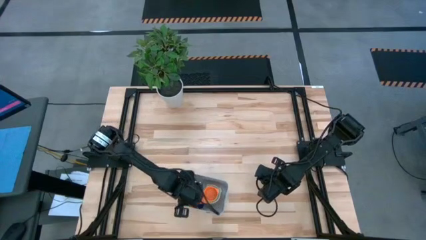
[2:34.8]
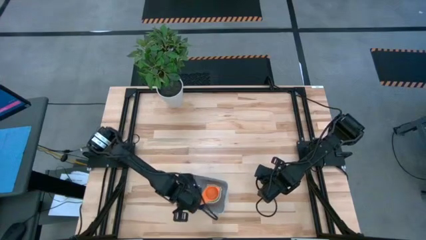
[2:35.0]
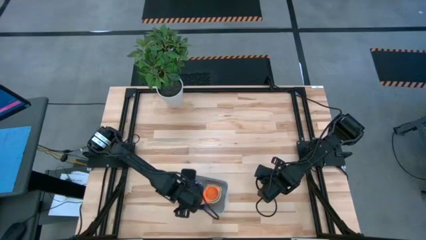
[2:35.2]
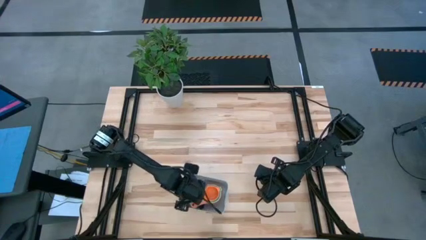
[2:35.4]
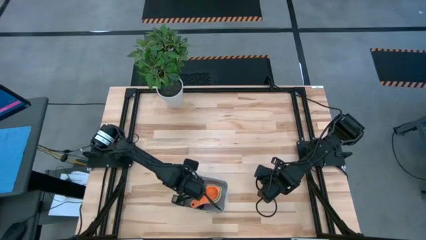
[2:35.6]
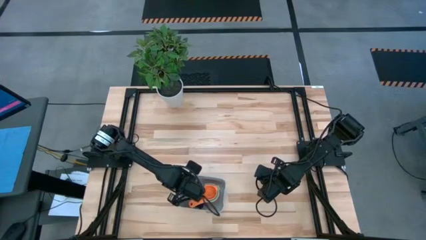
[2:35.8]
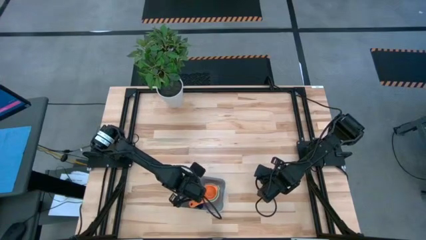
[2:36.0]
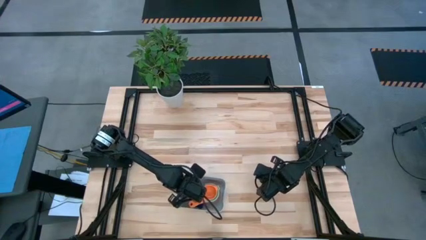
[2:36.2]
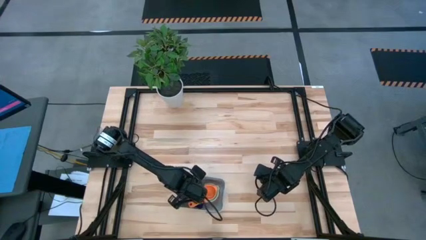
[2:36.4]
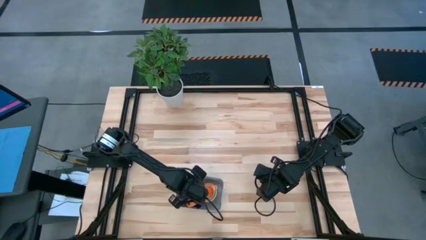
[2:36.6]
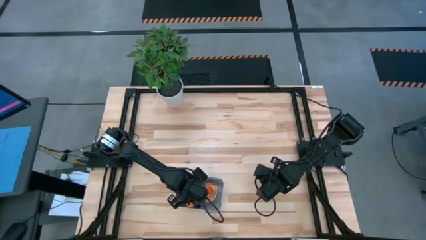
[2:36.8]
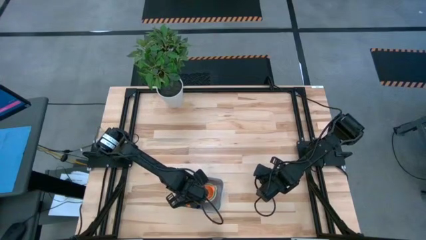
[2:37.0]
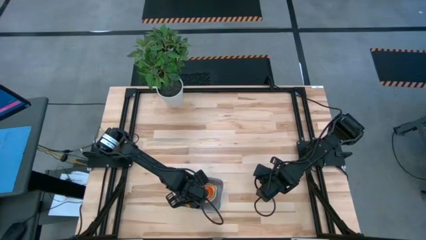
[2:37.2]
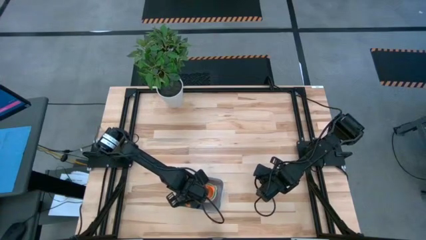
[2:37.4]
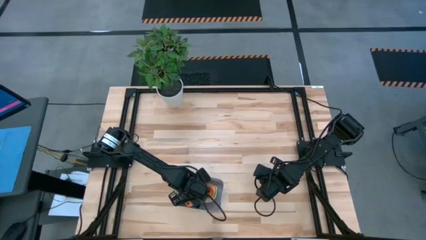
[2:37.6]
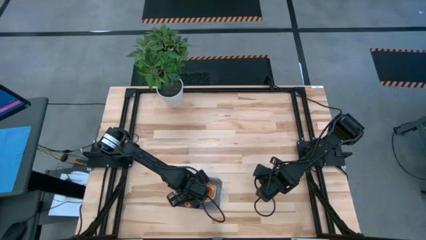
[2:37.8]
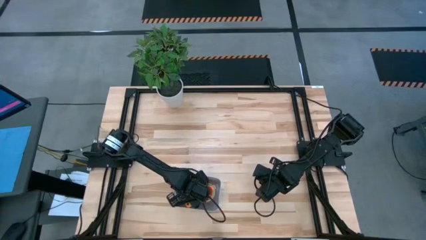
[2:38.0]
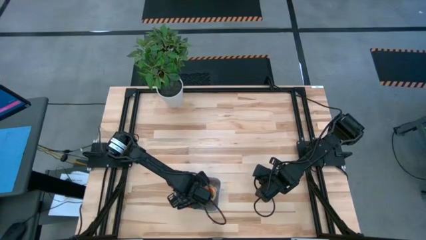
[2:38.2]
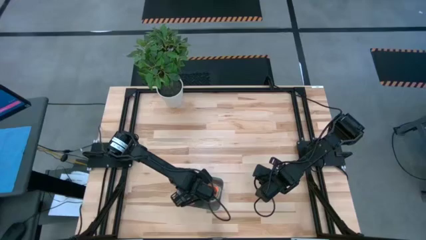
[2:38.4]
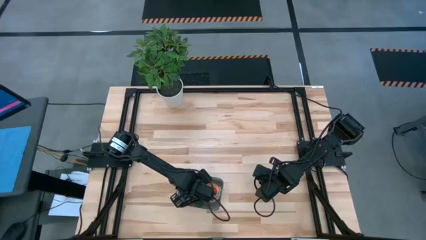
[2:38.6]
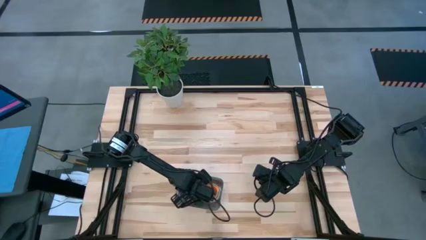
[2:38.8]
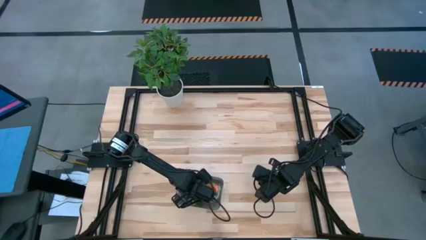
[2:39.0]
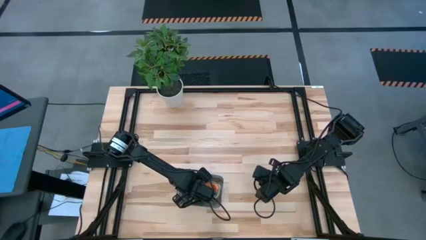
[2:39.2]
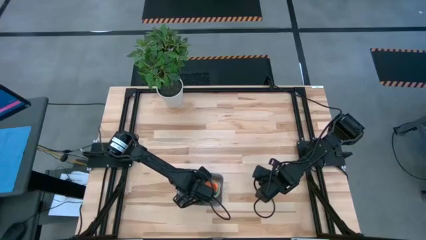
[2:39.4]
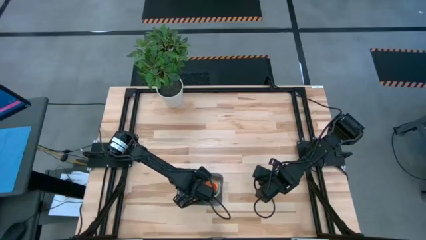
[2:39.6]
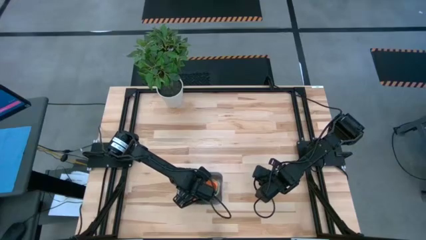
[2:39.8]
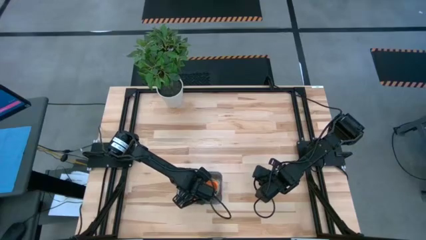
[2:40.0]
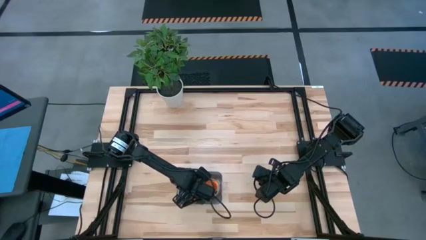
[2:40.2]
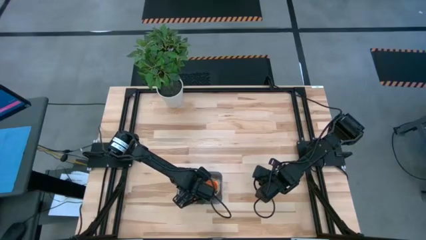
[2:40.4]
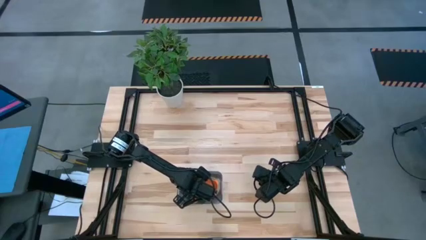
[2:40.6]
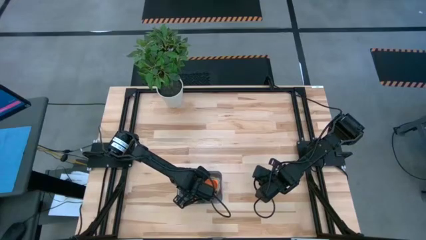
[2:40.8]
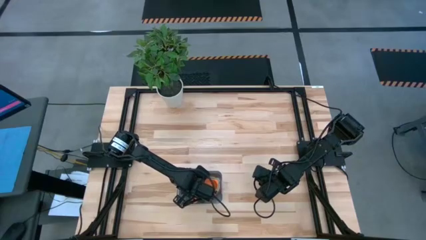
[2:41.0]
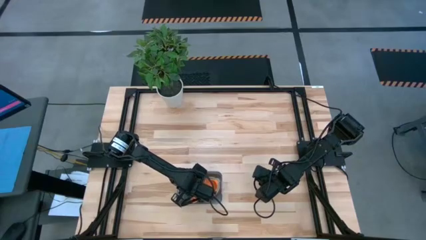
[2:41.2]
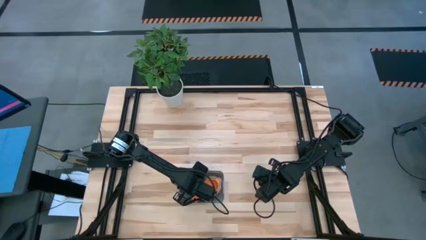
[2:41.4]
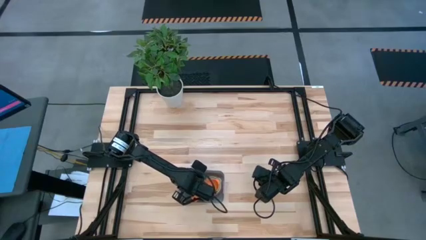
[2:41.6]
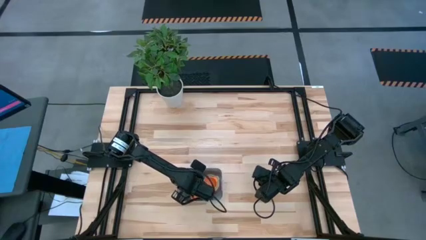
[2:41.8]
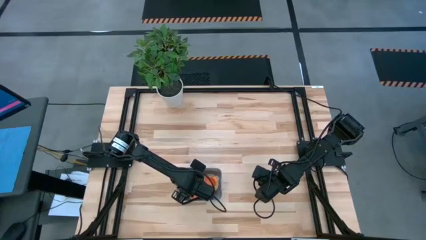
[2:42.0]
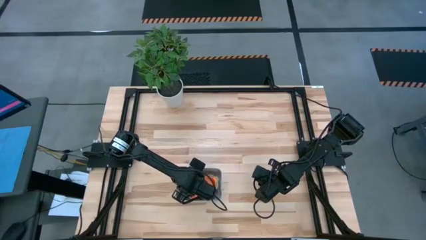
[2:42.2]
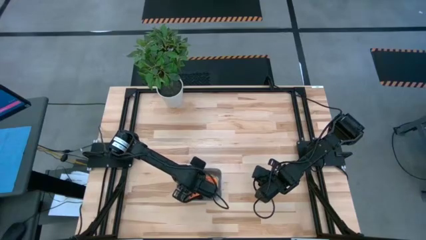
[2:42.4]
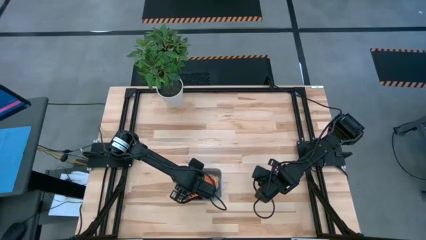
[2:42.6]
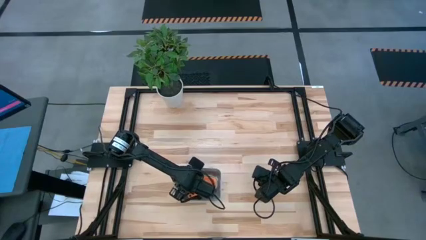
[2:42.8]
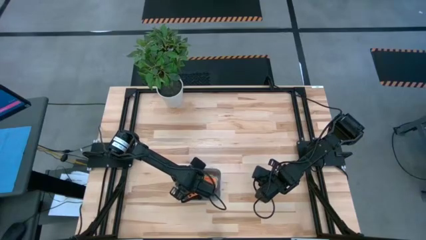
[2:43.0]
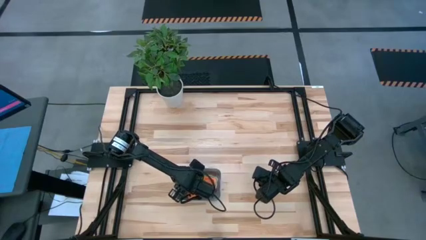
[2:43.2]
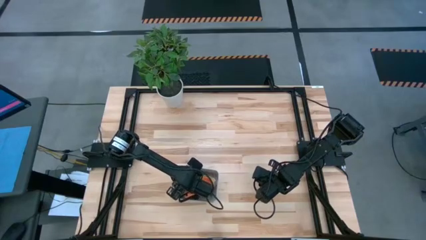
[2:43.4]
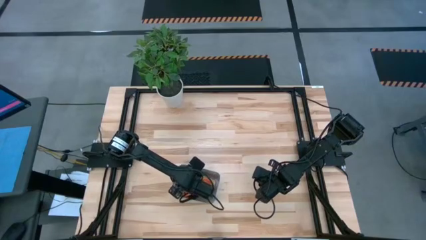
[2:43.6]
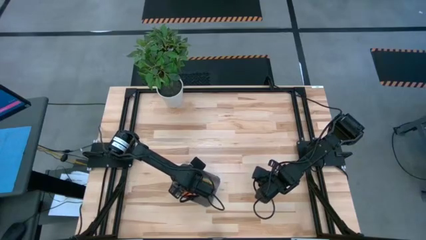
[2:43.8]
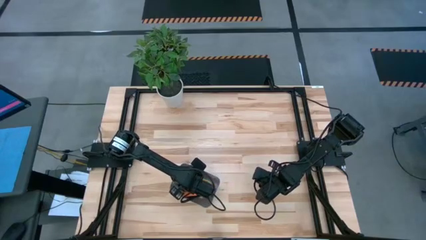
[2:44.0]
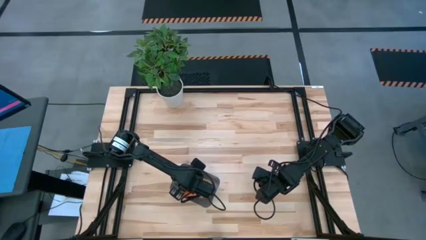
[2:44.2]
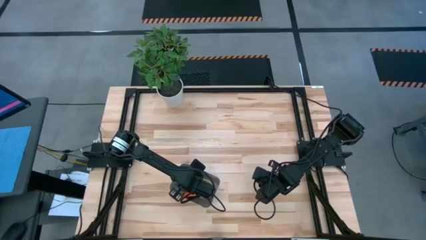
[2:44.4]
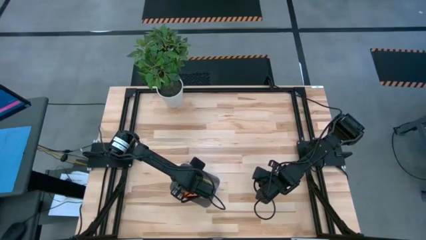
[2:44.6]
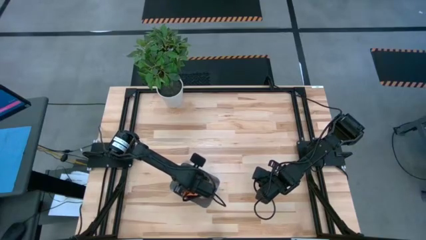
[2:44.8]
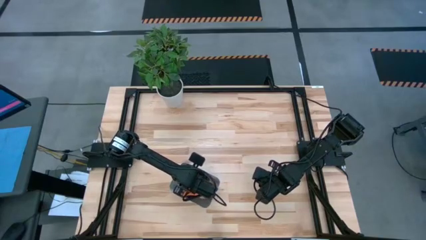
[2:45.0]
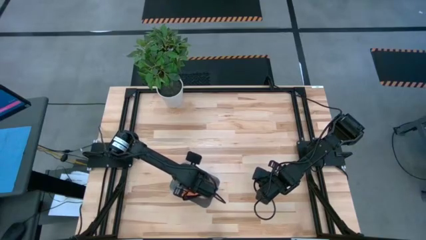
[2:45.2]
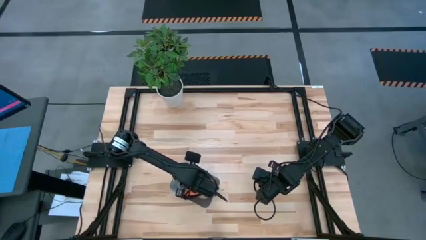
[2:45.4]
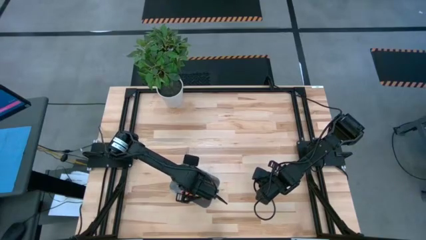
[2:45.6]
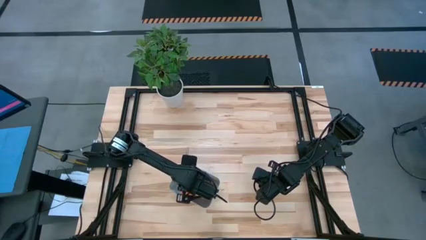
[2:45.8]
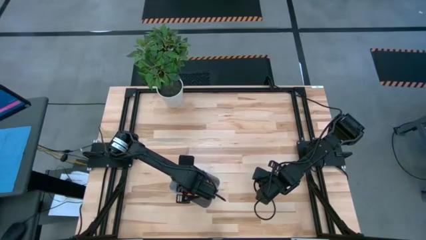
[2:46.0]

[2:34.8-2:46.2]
Task: Nest measuring cups in basket
Remove the dark blue measuring cup from the gray bin

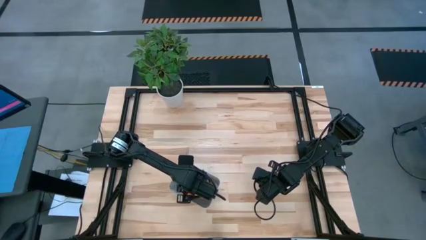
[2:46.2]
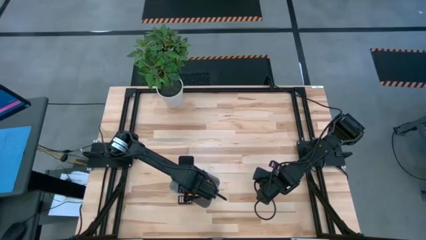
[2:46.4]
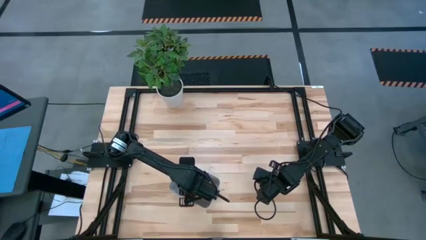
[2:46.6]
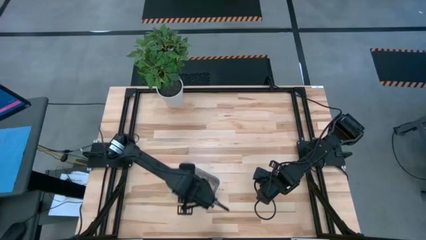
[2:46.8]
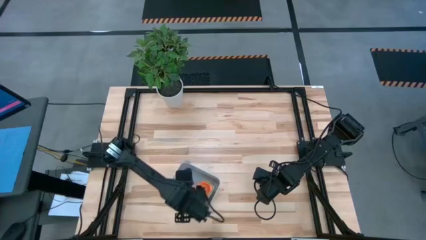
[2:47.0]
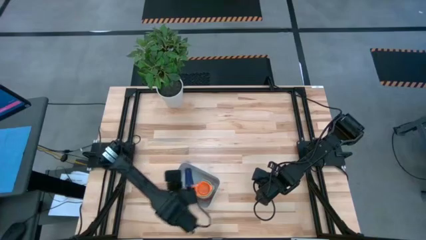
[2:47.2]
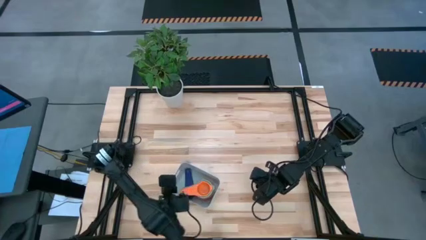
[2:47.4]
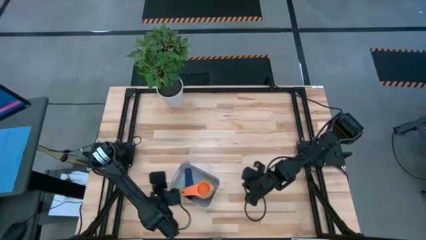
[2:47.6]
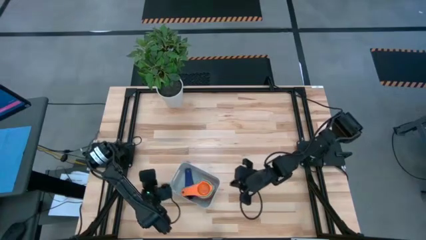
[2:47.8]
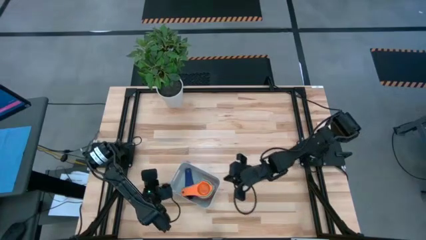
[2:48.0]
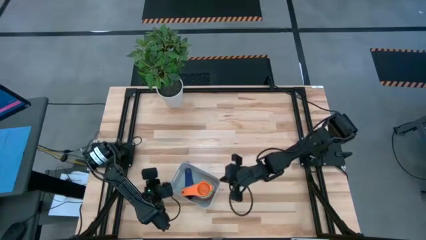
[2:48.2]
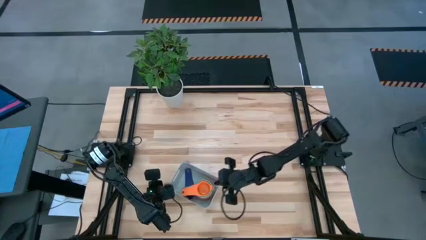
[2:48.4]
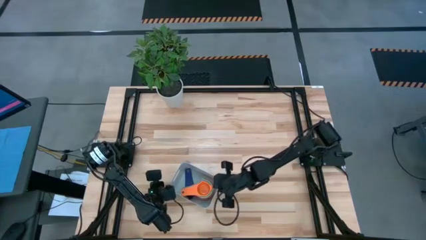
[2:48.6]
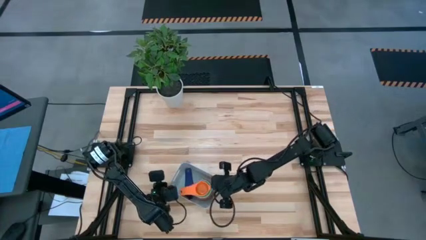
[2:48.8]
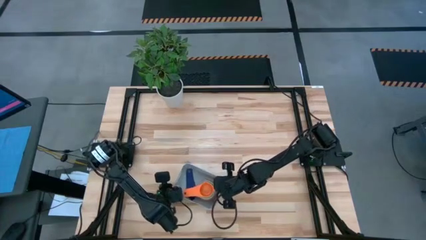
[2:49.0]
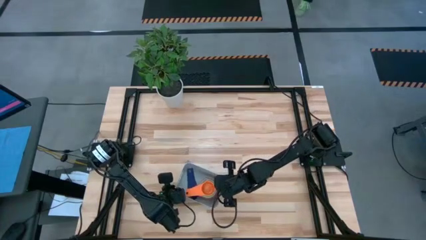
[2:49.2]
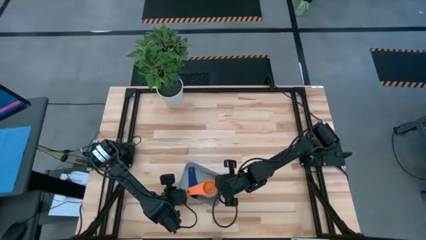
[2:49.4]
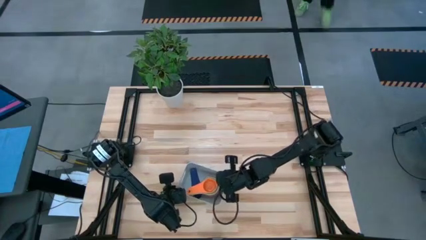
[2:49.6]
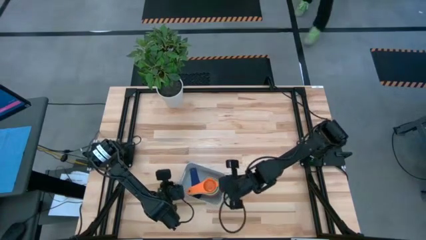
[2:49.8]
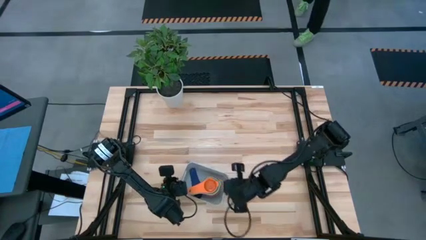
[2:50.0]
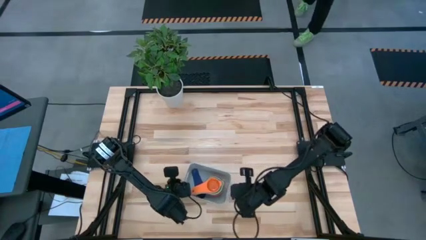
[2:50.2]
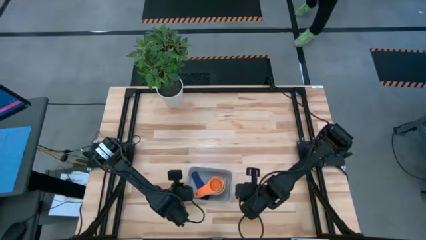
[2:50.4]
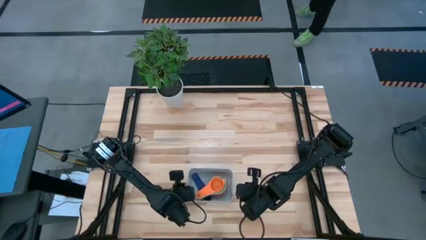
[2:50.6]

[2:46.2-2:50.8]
Adjust the gray bin

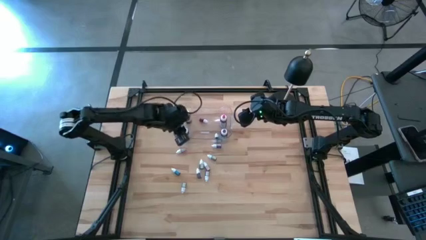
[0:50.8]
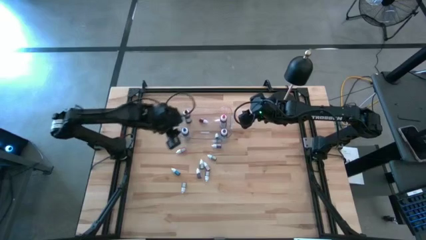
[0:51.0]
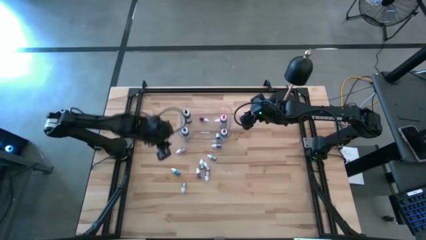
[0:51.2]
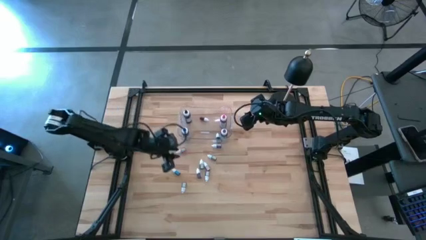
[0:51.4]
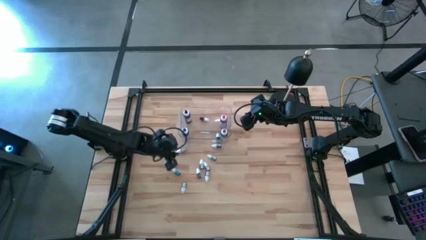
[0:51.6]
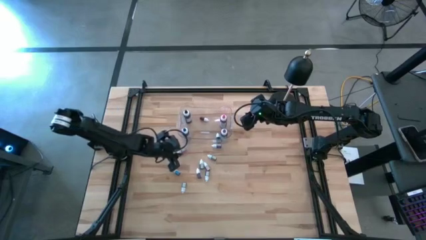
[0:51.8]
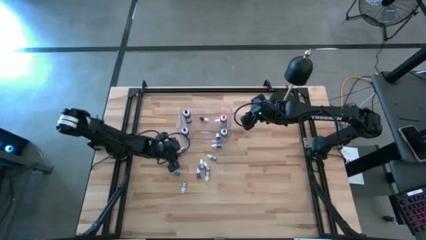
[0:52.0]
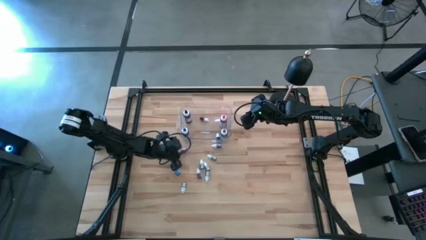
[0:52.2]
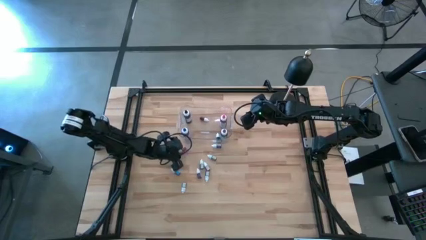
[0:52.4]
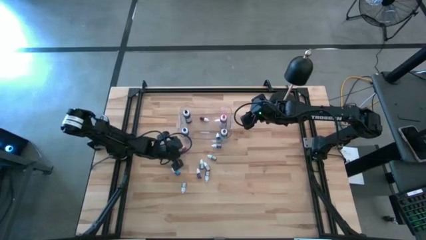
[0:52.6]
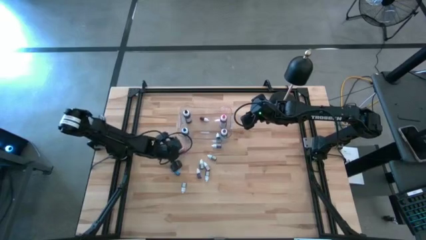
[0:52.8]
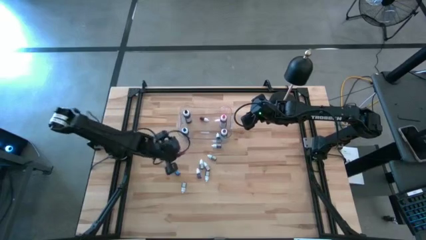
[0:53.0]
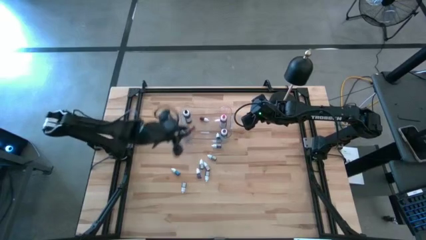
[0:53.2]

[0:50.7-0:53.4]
Task: Pick & Place food coloring
Put the small red food coloring bottle into the transparent bin
